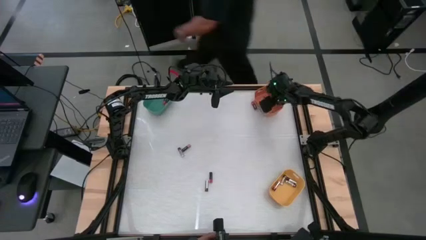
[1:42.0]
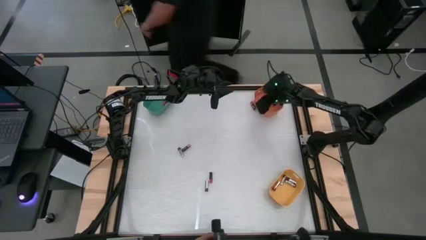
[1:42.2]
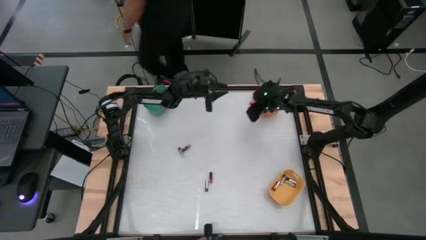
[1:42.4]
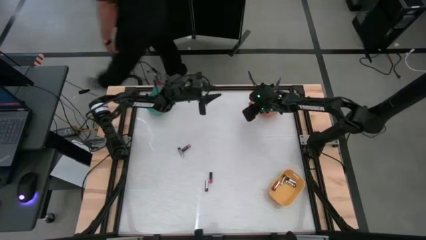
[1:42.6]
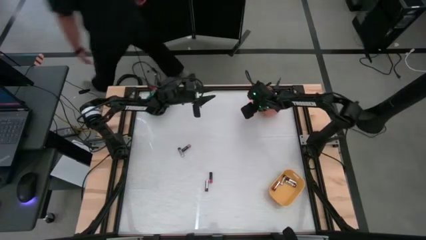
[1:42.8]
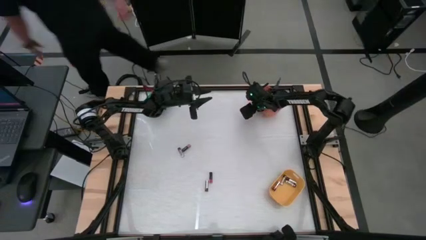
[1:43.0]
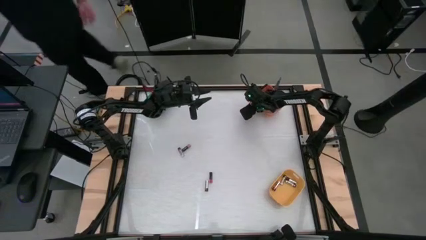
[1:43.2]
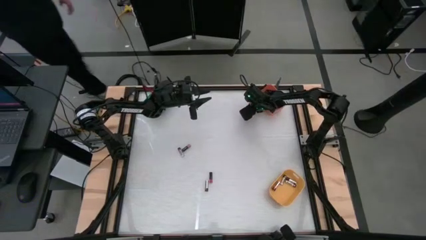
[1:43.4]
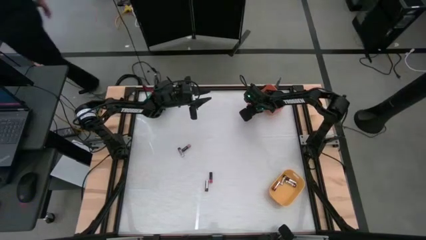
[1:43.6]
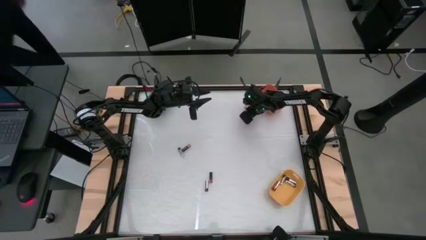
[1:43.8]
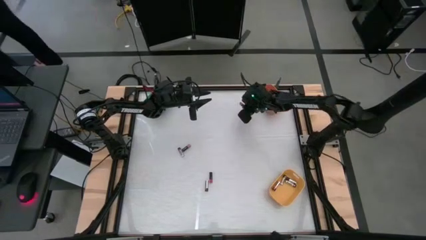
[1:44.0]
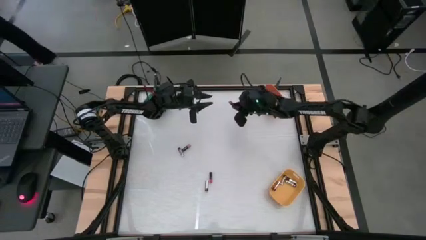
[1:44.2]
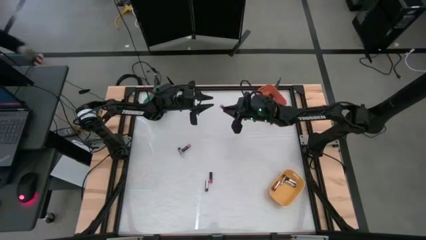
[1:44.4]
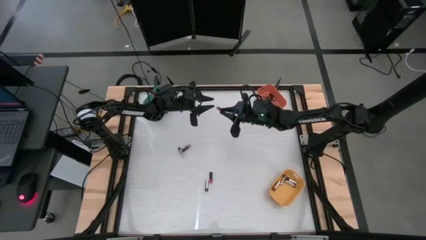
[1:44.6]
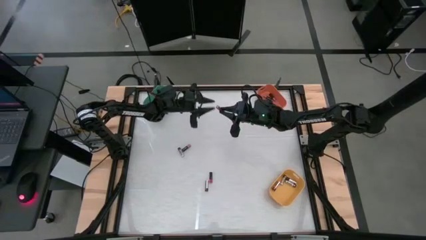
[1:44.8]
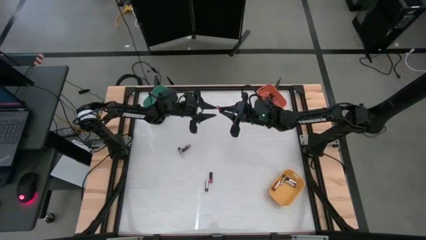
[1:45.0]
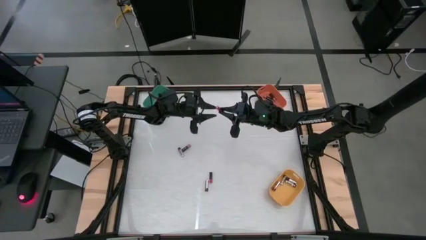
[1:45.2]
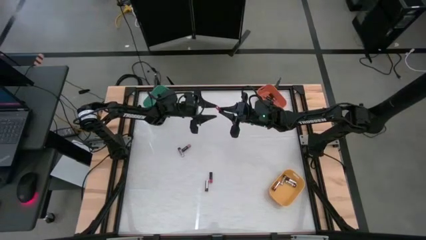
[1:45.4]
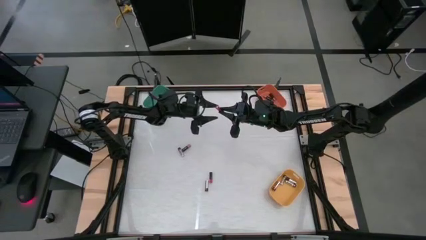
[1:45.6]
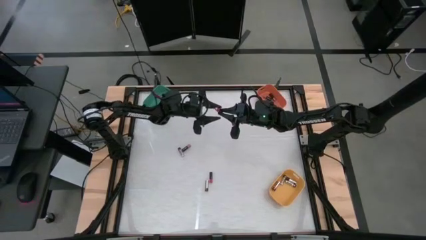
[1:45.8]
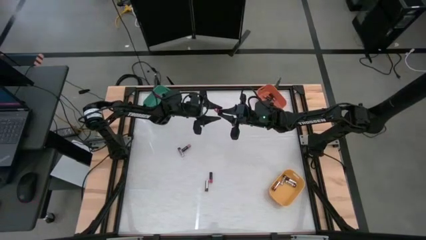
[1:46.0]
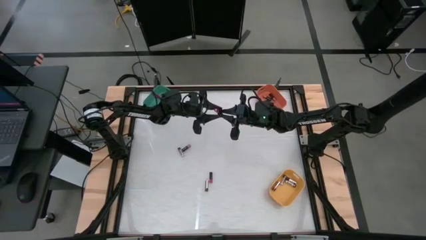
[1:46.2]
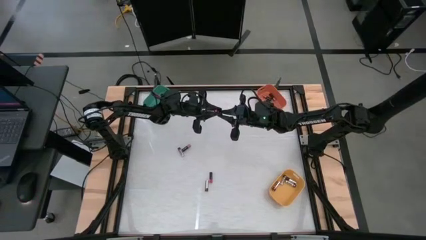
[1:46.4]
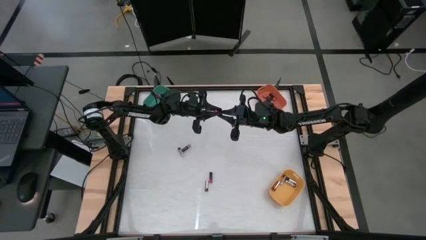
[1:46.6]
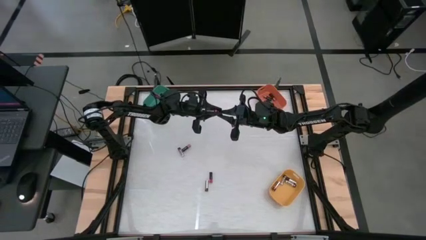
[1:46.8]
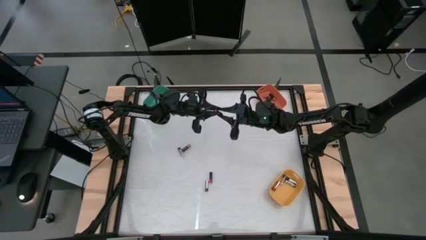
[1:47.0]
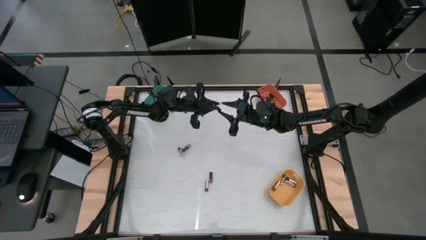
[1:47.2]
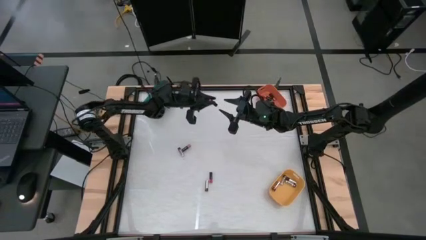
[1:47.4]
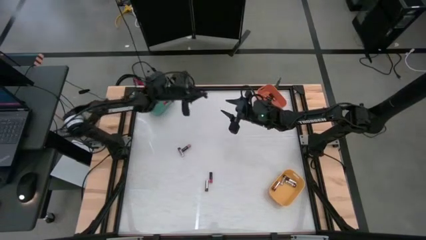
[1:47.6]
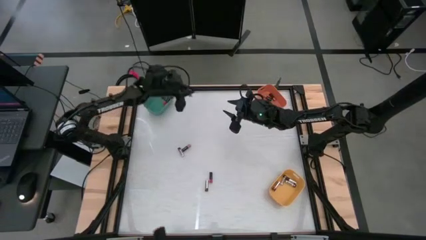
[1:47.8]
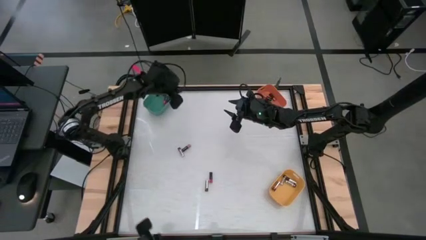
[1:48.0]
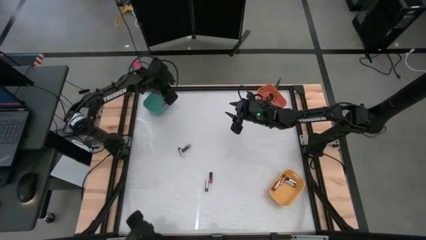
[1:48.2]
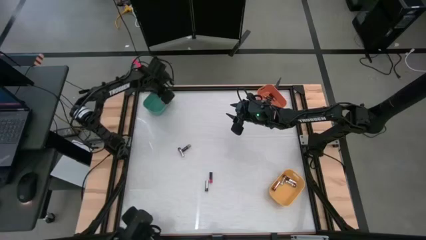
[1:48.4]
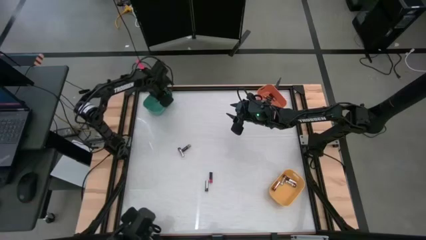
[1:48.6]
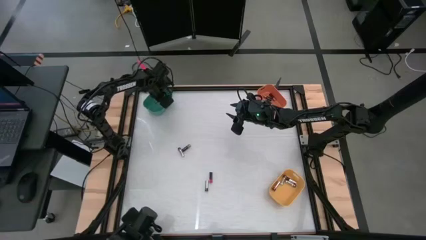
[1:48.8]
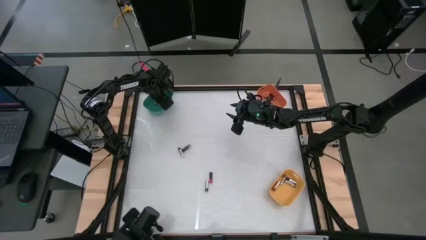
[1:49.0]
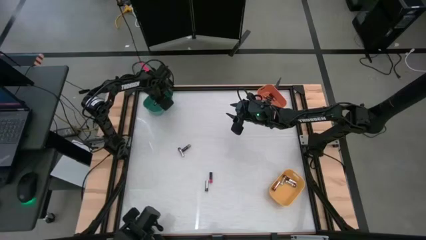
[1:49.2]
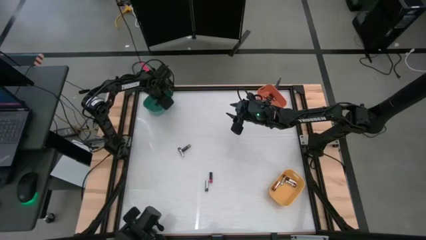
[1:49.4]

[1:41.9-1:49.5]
Task: Sort batteries
Put the red battery into the green bin

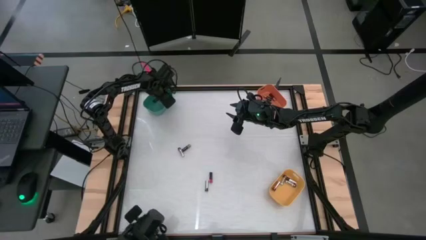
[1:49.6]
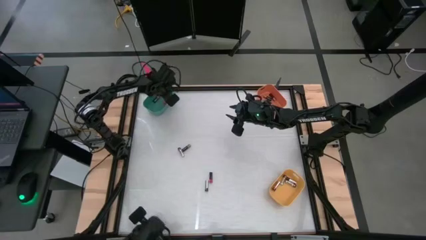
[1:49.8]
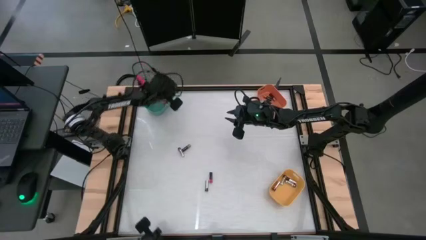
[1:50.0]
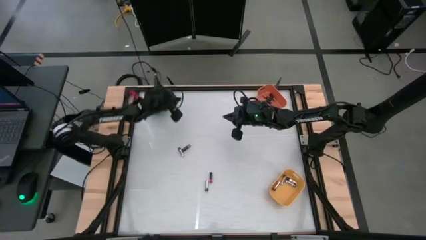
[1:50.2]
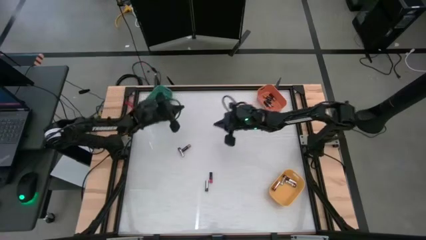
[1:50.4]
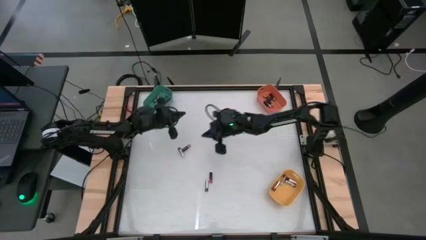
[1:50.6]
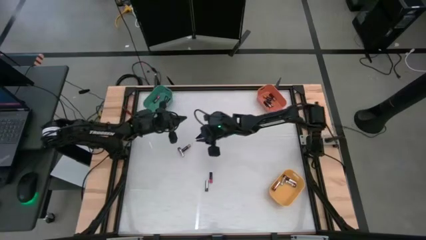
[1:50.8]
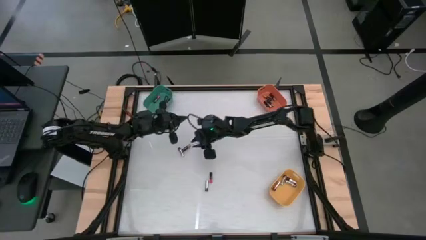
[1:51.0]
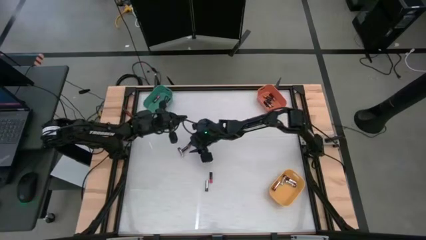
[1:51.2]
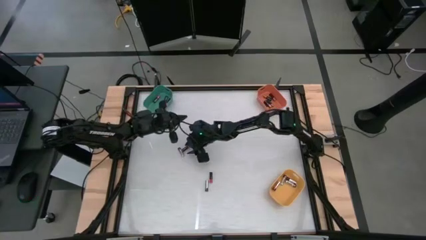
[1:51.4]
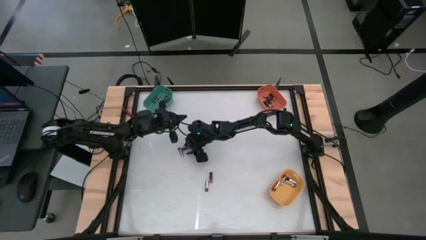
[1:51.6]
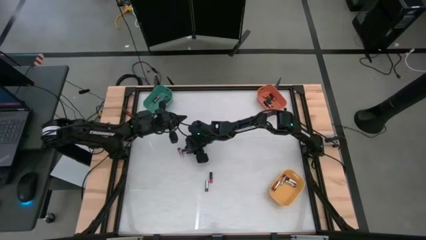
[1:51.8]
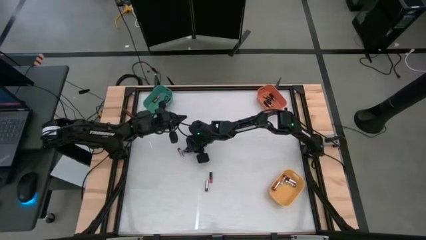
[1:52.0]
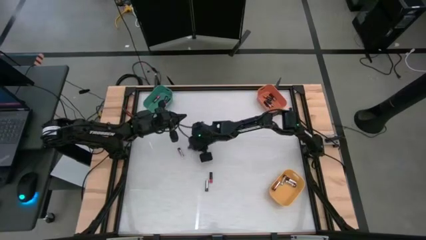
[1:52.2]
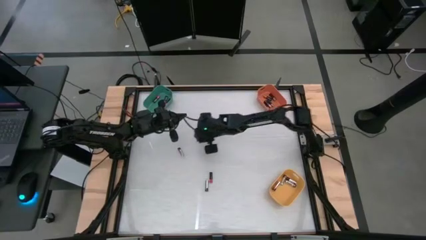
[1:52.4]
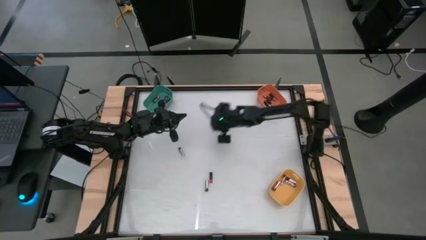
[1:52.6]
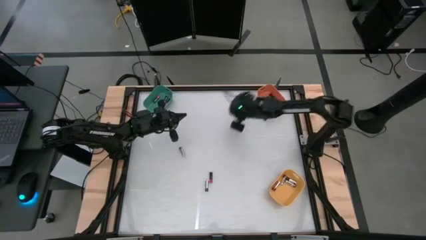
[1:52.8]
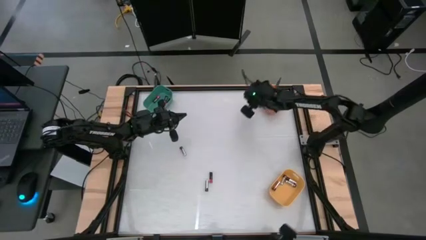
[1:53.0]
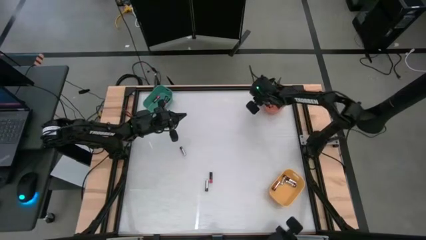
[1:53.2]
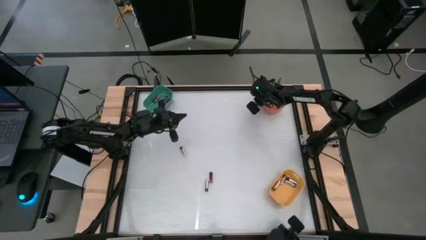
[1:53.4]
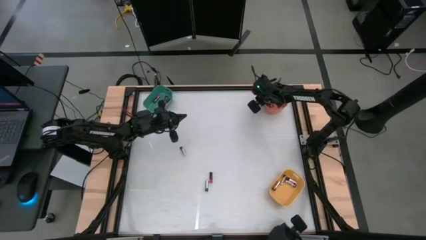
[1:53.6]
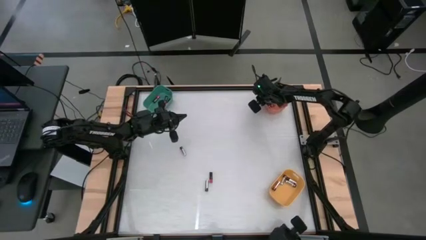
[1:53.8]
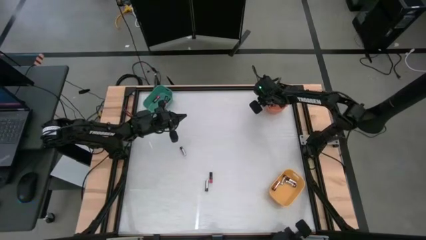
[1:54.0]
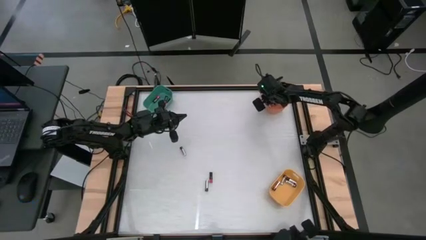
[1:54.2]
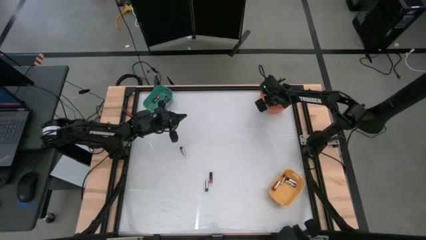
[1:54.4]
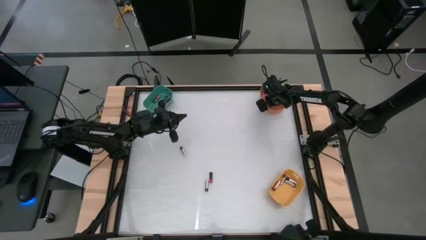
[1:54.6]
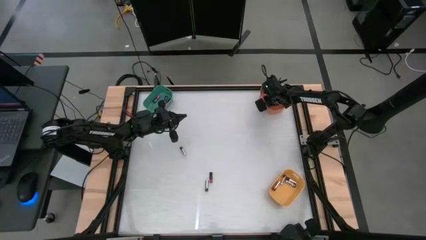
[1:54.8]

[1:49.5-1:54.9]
Put the black battery into the orange bin

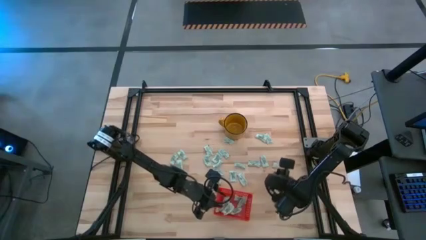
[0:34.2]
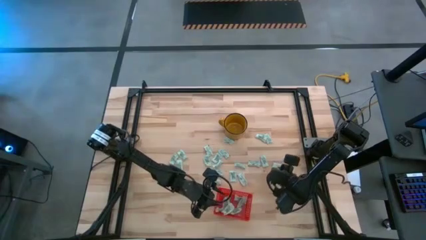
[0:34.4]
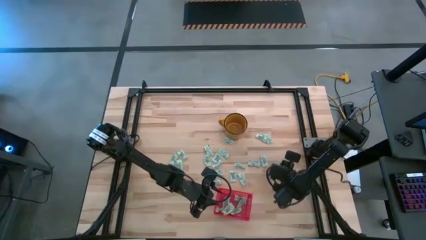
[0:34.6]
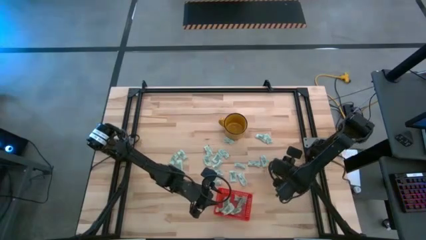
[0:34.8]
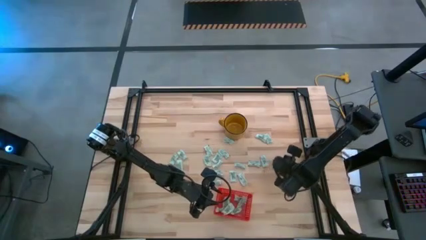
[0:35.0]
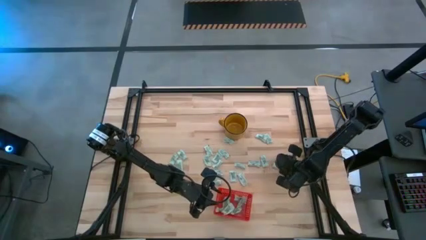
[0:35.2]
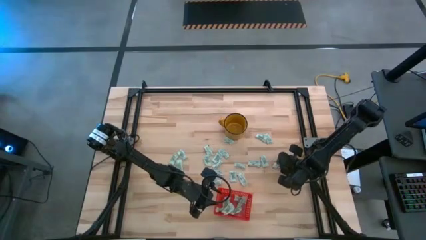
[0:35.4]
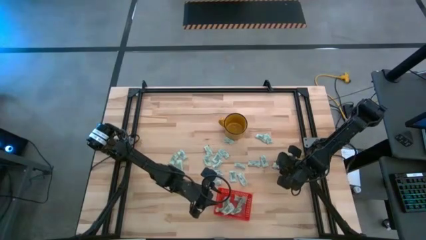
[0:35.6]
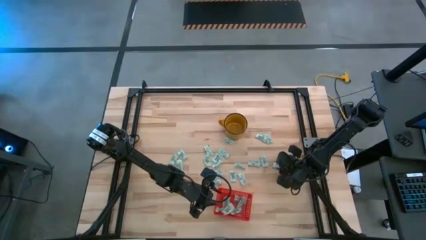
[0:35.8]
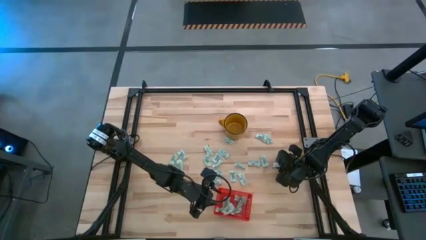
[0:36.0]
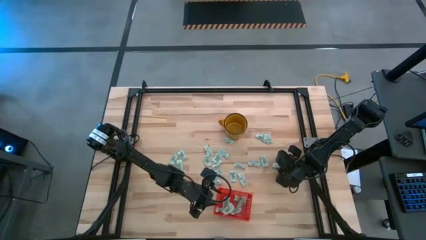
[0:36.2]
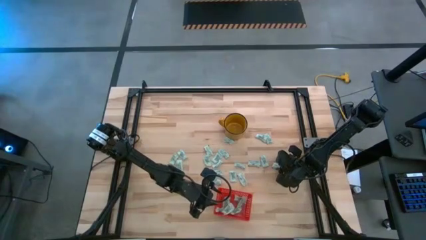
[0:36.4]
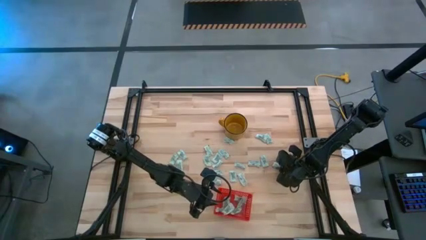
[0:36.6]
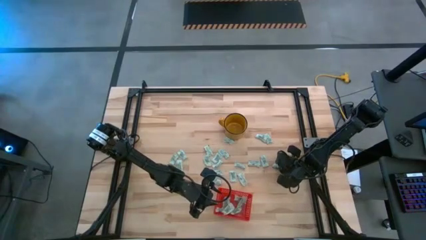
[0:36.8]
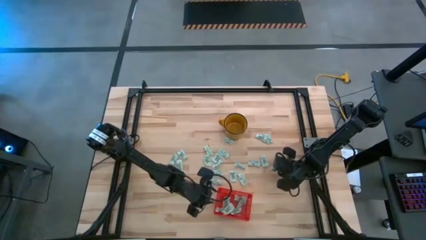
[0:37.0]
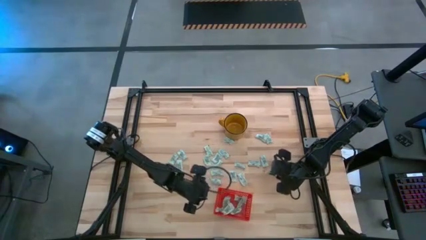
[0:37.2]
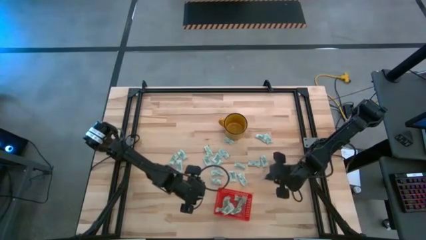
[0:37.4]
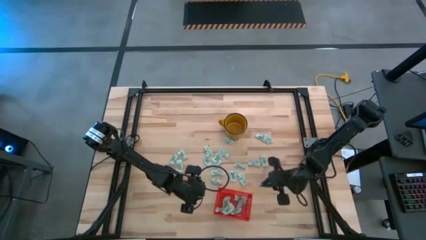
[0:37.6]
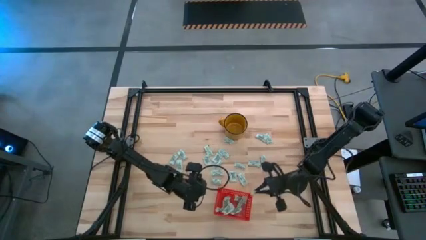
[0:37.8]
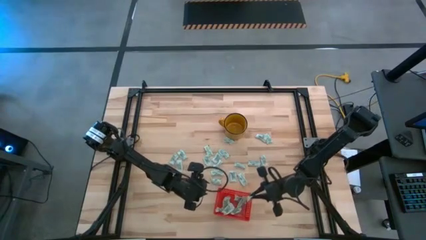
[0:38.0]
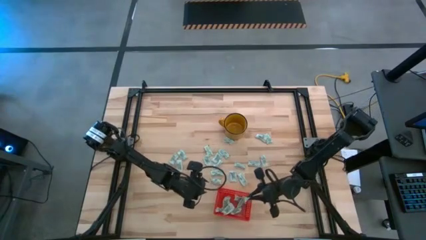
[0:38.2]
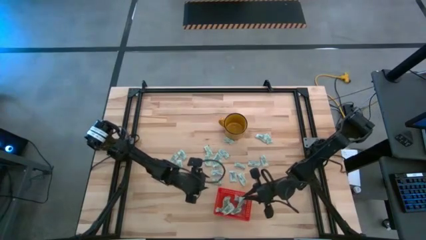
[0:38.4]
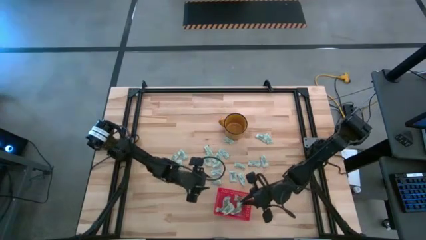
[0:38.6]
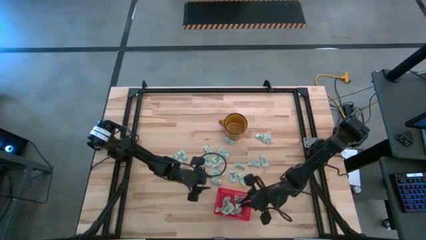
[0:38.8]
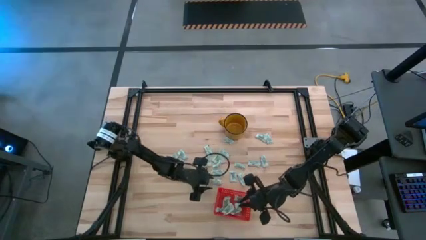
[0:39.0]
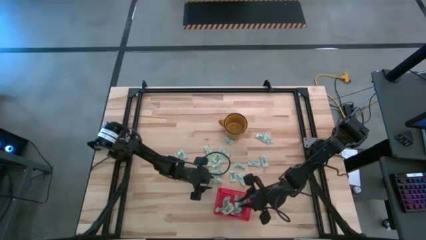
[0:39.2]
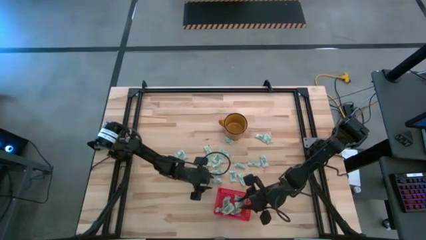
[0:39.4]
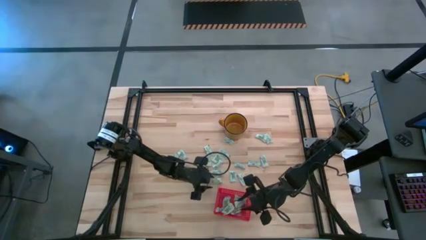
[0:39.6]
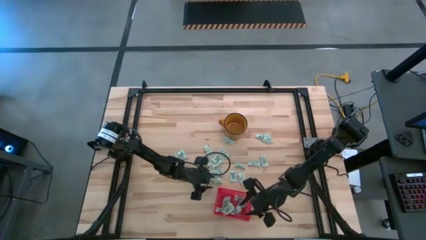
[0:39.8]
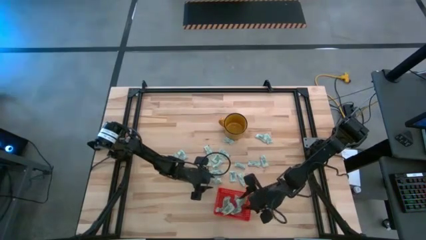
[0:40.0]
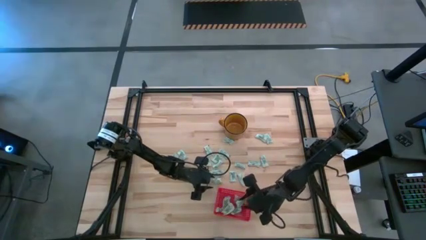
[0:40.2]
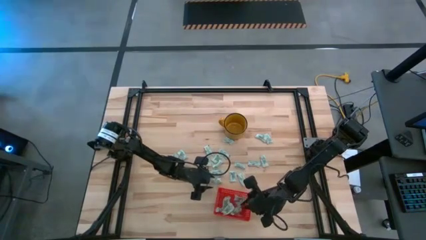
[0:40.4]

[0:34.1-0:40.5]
Task: Pick and place Stevia / Truvia into bins
Put the stevia packet into the bin
